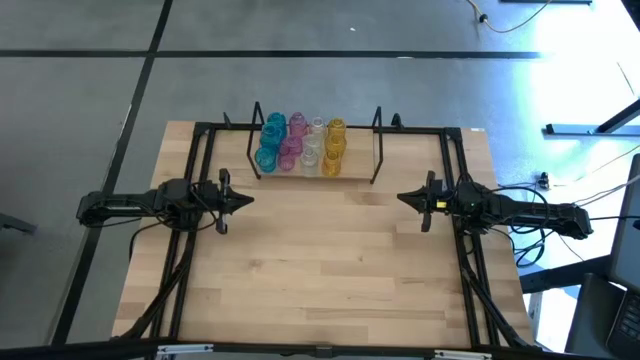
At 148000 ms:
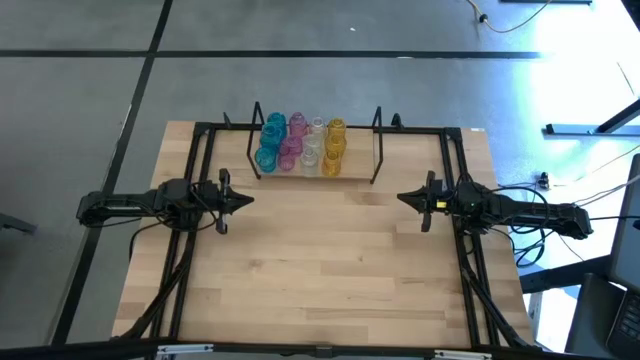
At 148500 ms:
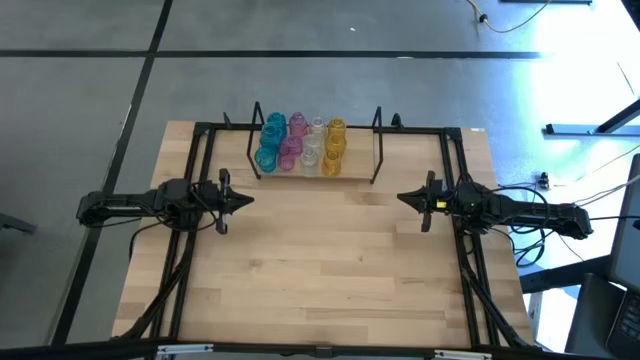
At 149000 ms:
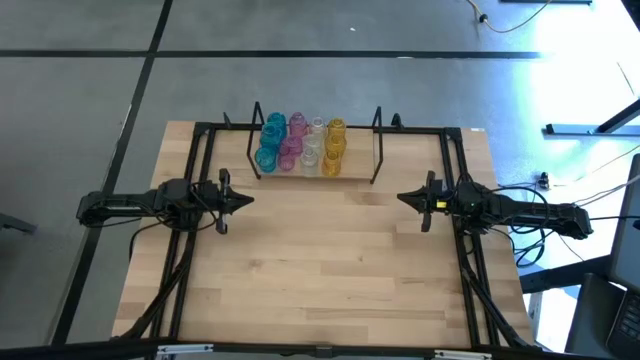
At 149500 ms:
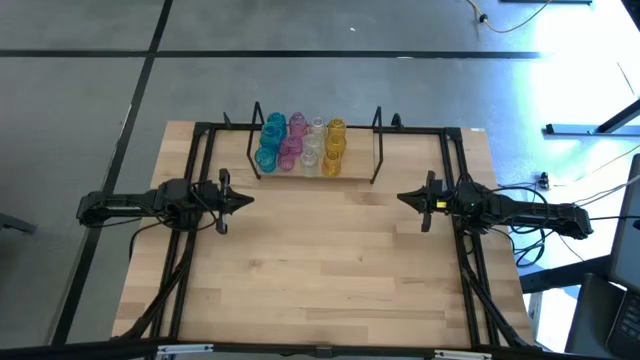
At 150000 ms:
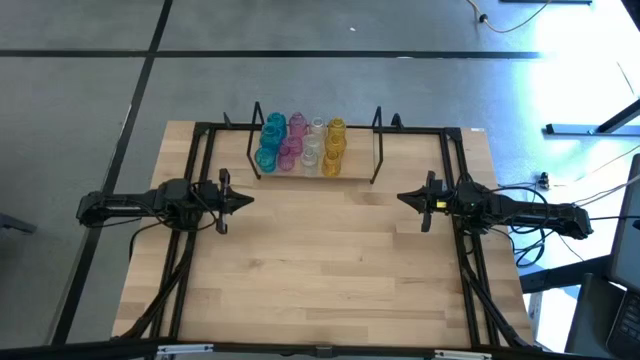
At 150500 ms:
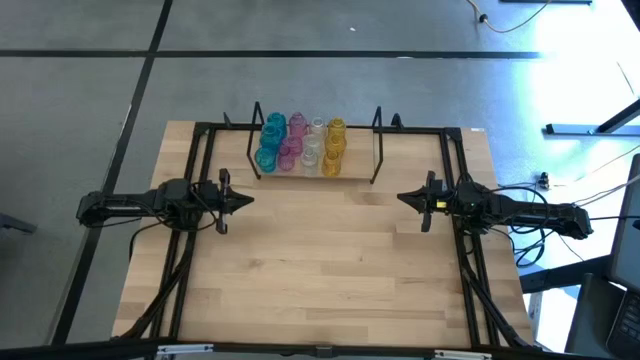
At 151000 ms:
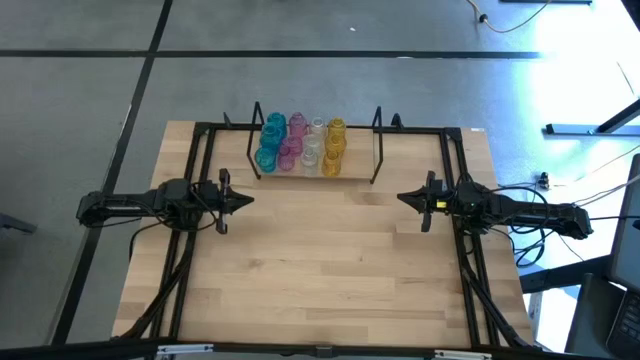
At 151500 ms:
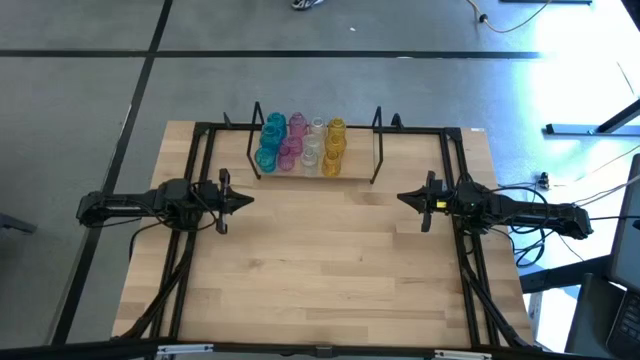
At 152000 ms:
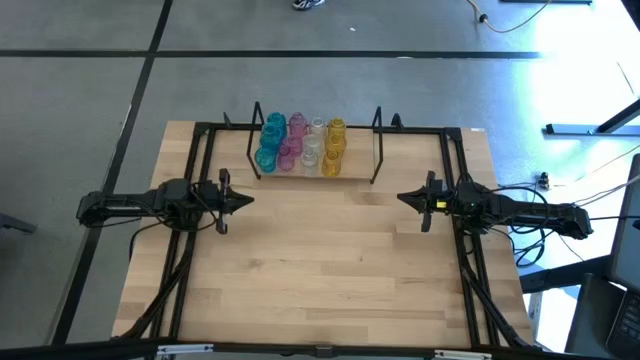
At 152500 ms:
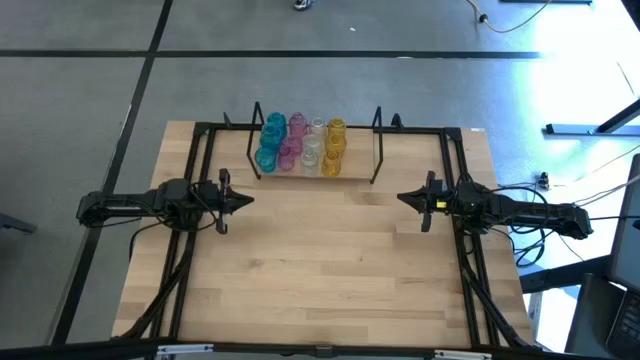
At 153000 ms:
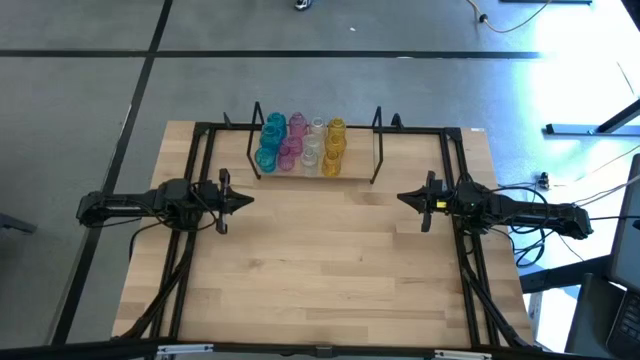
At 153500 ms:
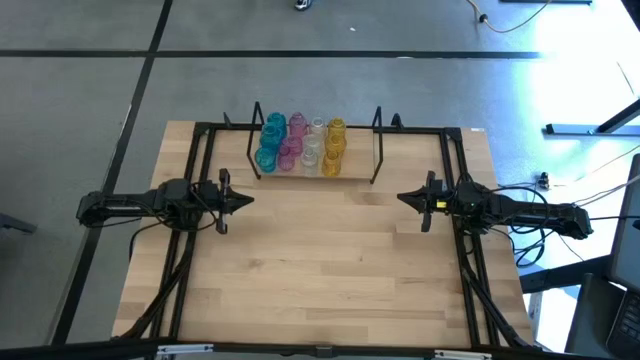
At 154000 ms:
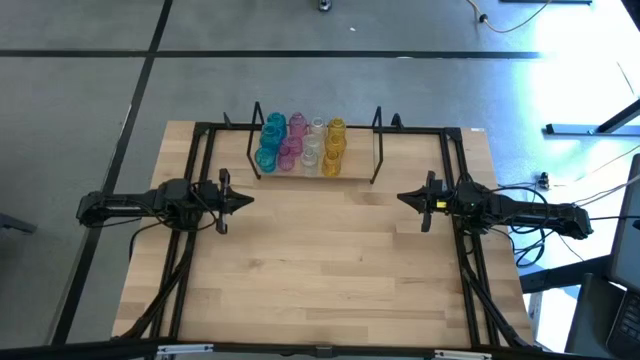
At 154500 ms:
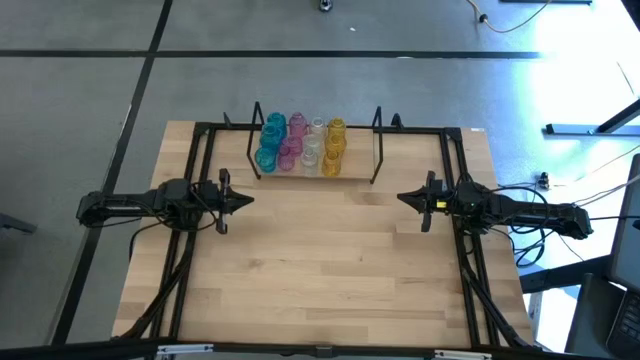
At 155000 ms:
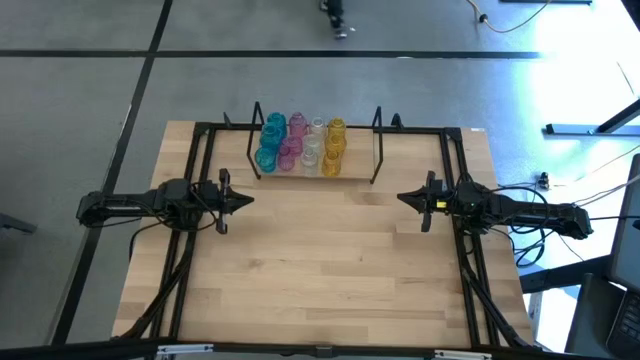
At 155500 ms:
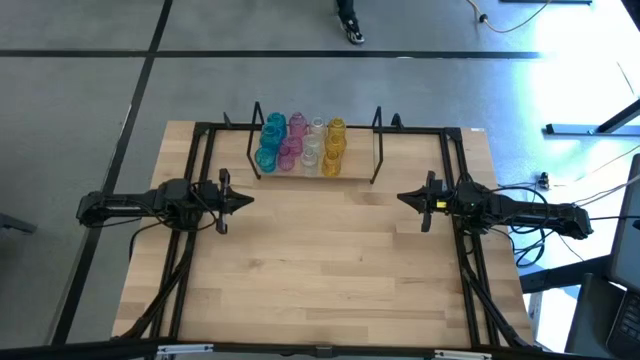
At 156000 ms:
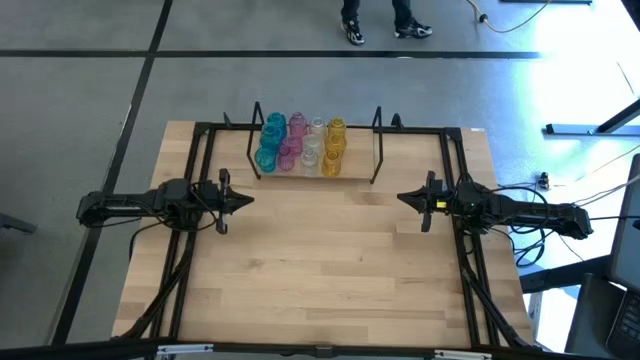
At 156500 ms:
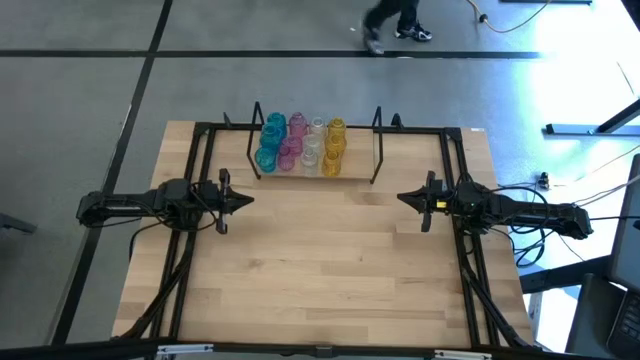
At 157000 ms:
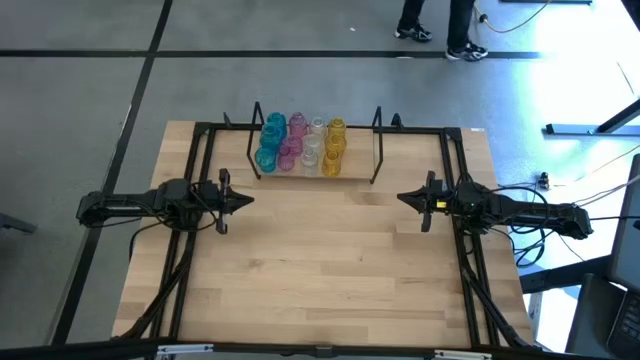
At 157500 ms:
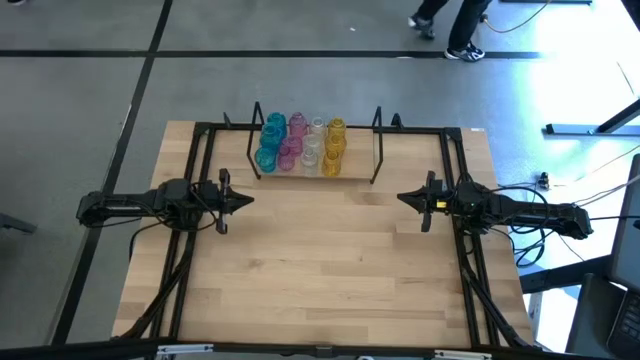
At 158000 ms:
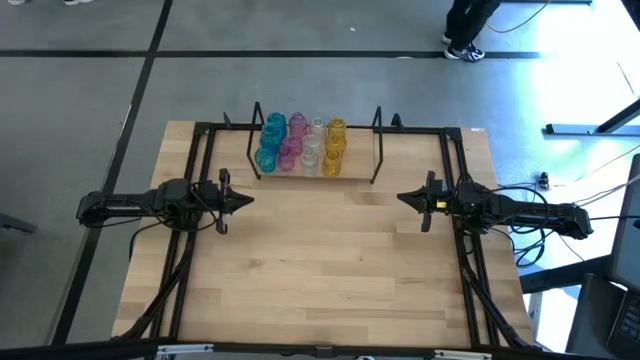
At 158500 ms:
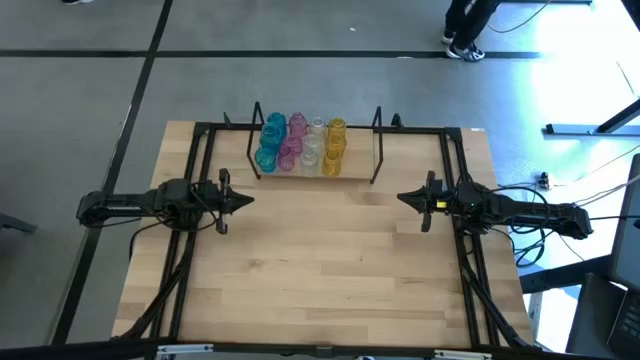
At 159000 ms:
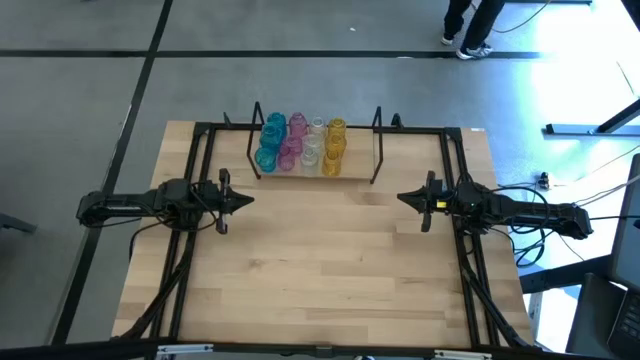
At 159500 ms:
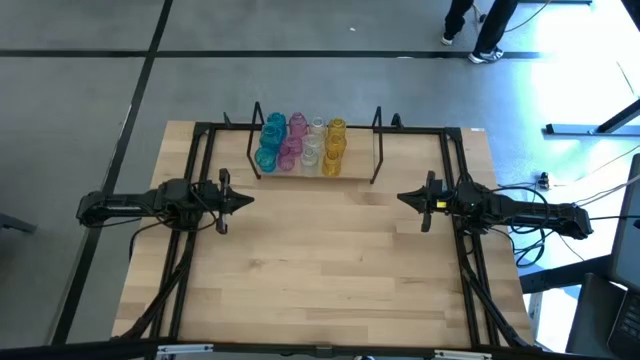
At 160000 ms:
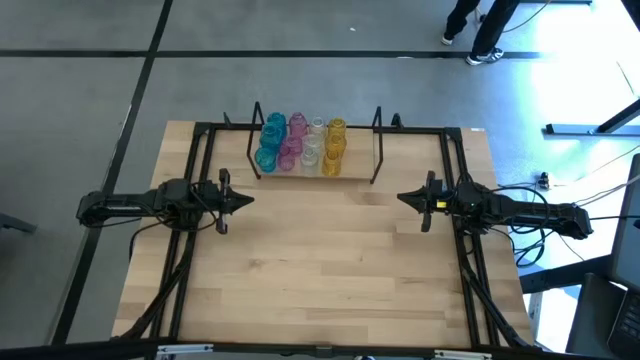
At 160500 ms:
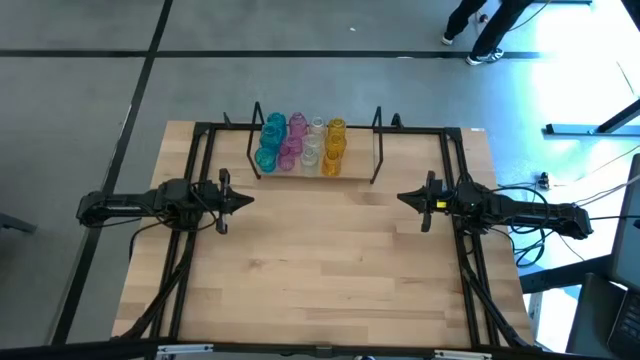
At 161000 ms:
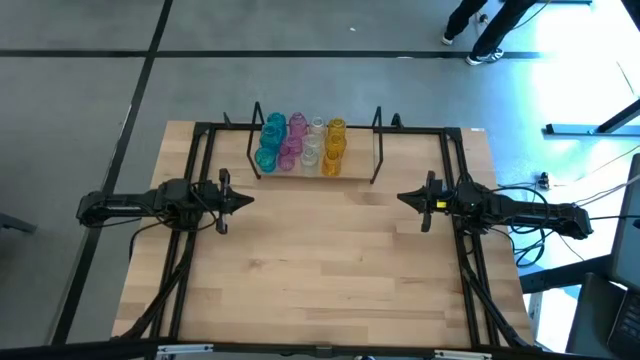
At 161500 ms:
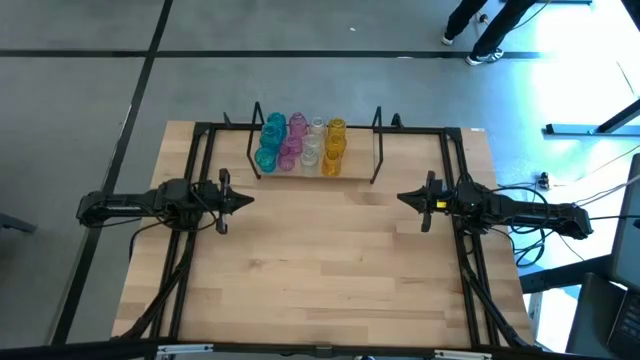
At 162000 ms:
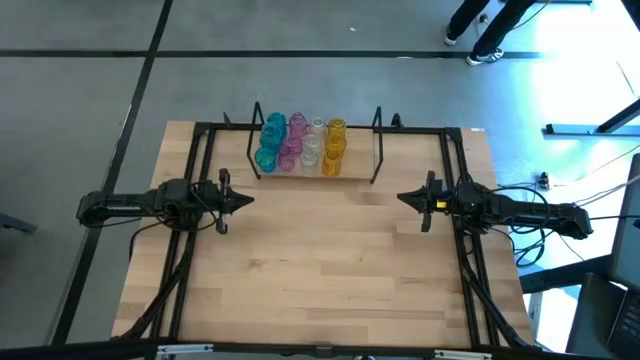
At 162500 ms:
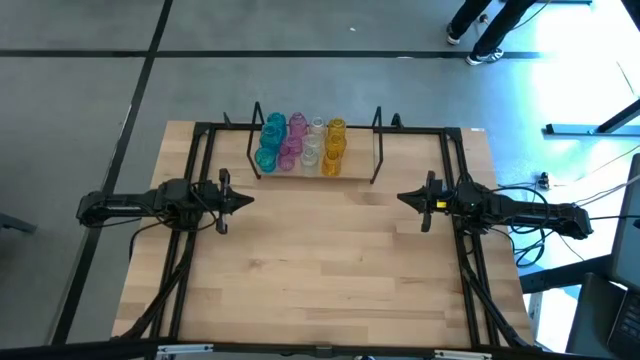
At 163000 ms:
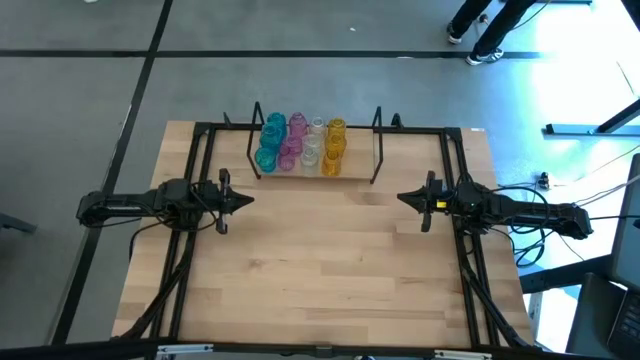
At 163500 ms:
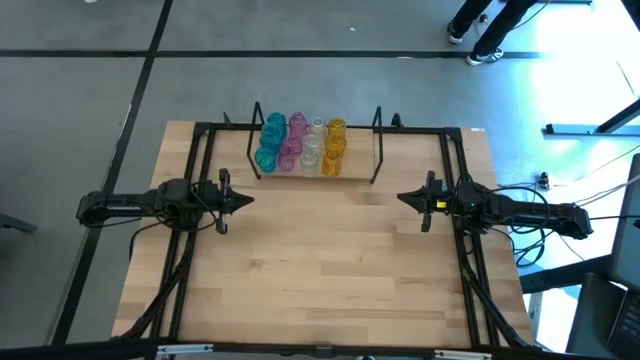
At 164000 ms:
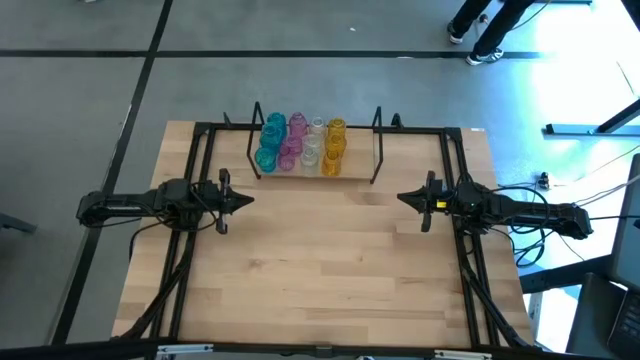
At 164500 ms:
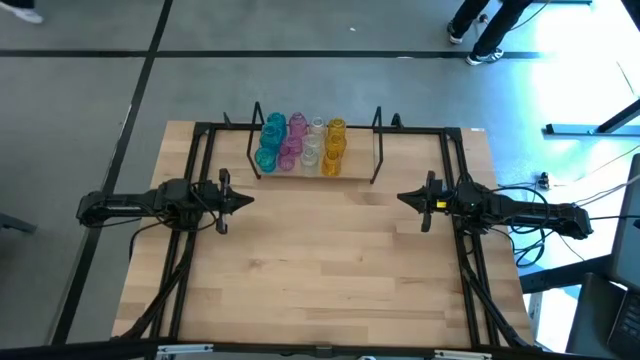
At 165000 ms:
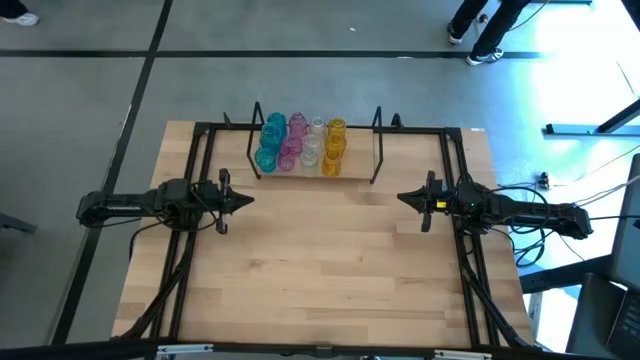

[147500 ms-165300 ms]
Task: sort vases onto shelf
Return to Home Position

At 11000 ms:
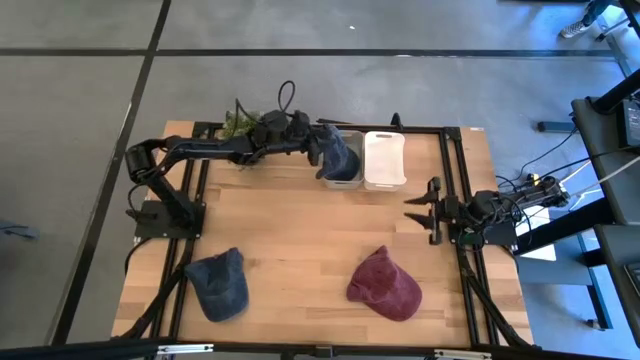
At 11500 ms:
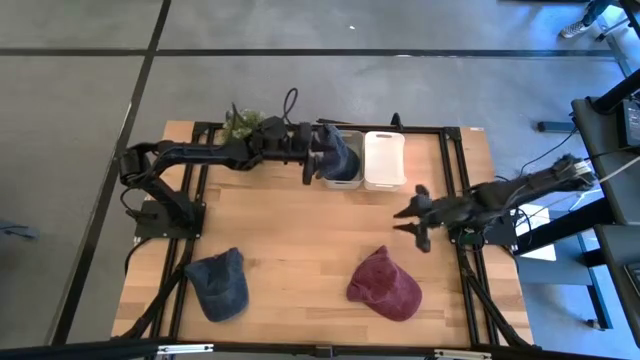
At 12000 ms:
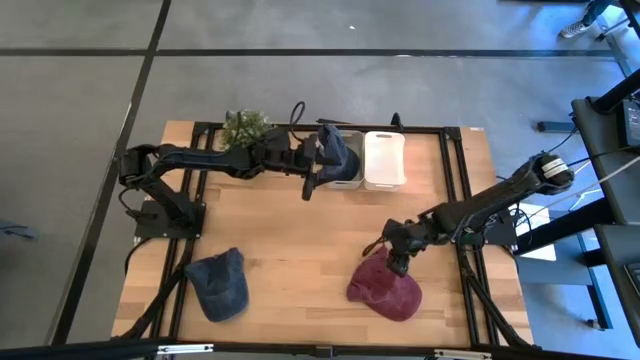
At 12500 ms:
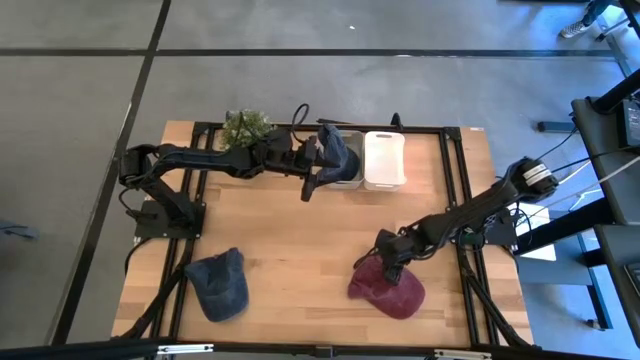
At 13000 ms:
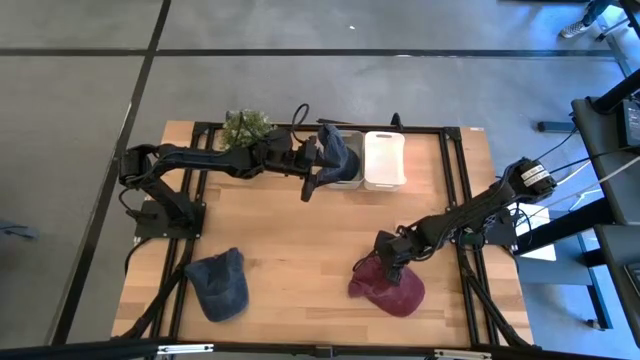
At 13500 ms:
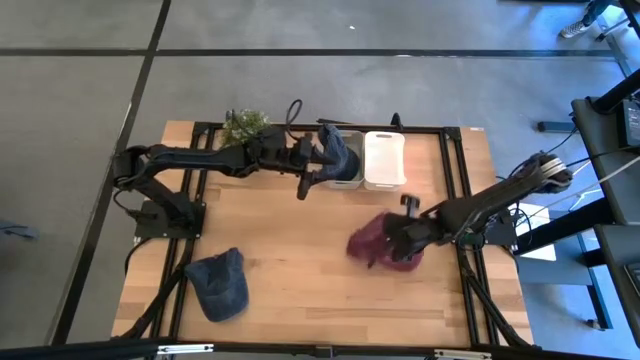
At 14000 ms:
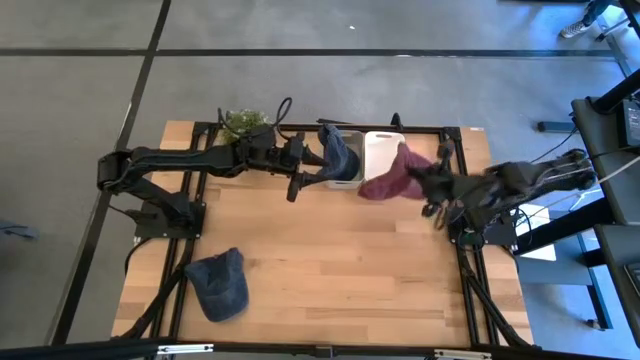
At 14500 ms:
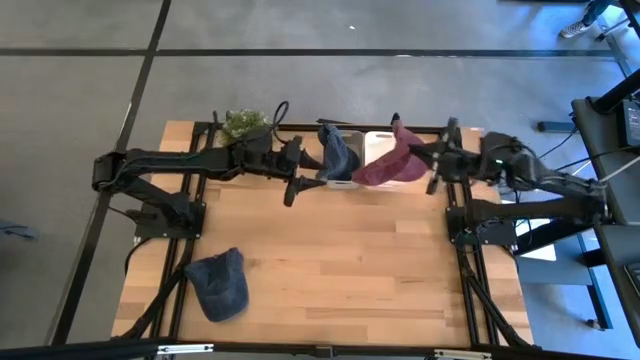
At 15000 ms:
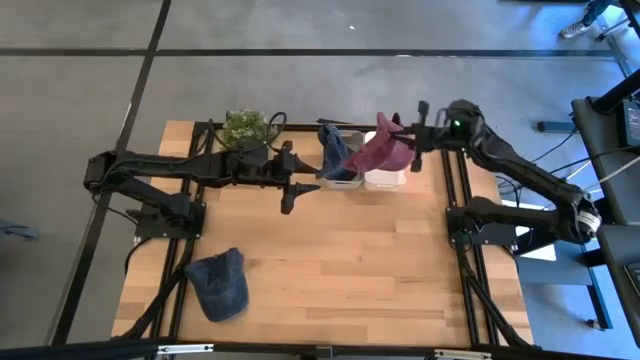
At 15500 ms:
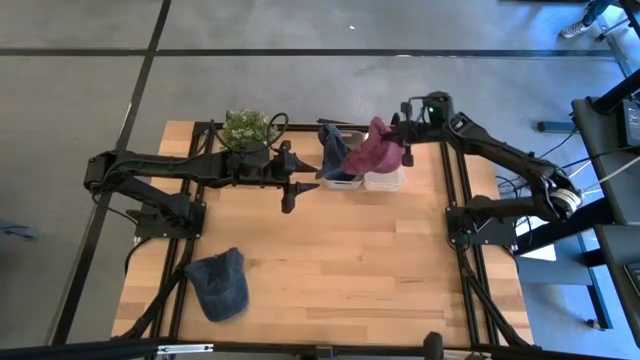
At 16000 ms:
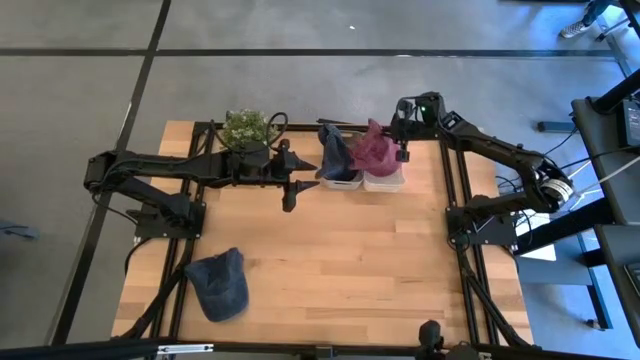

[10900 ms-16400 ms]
Task: Pick & Place hat
Put the red cap into the white bin
